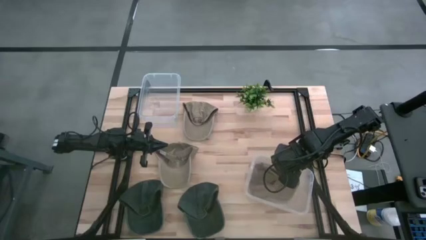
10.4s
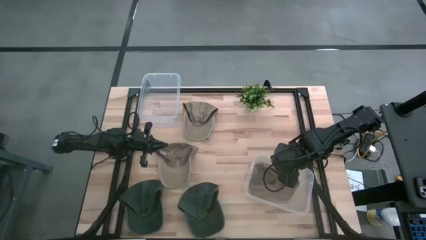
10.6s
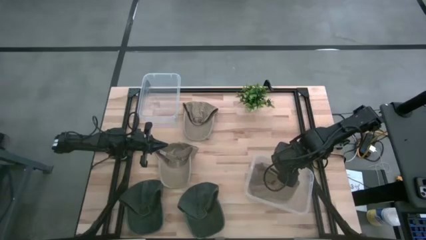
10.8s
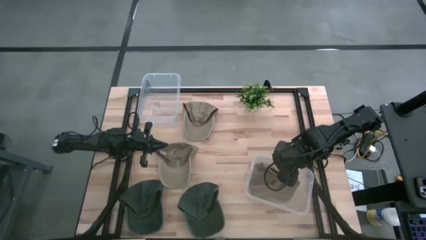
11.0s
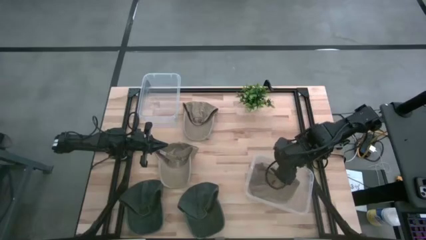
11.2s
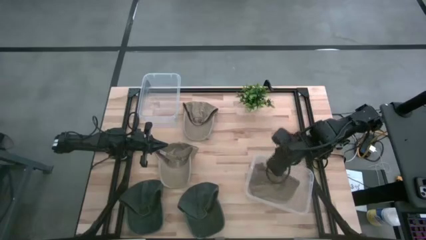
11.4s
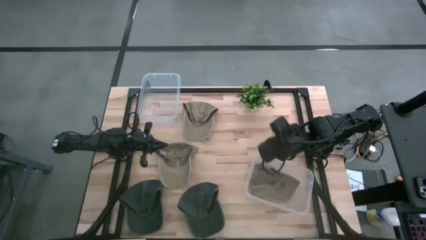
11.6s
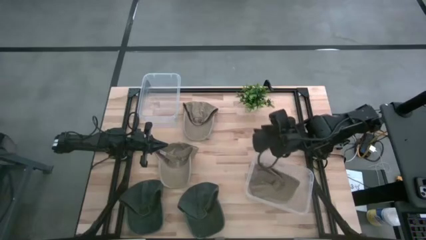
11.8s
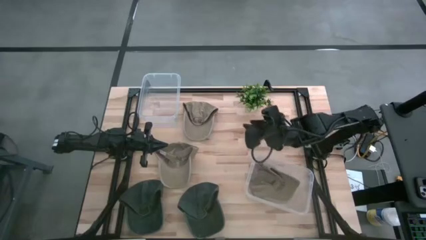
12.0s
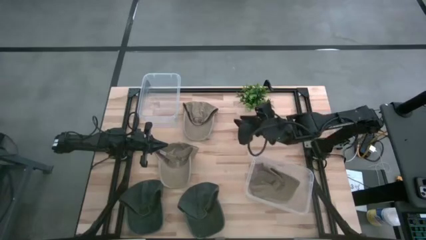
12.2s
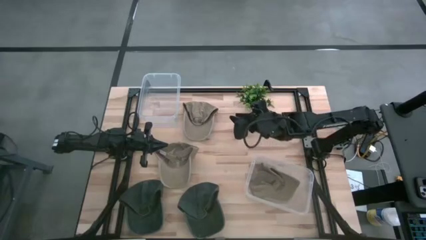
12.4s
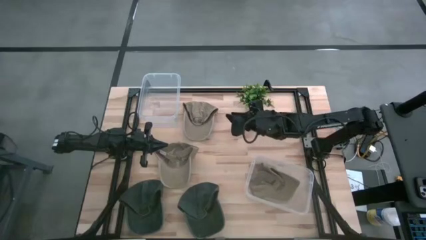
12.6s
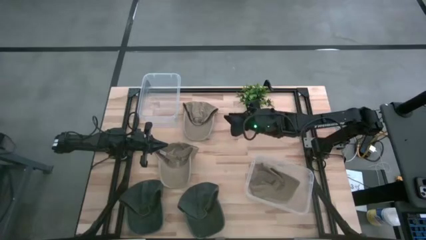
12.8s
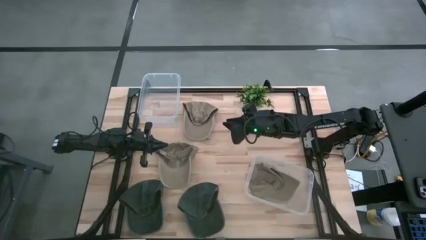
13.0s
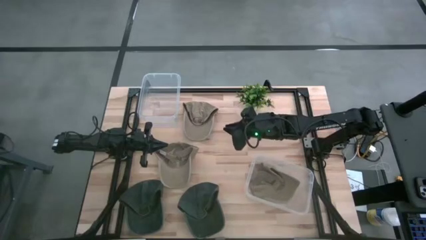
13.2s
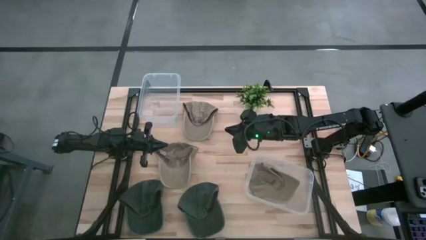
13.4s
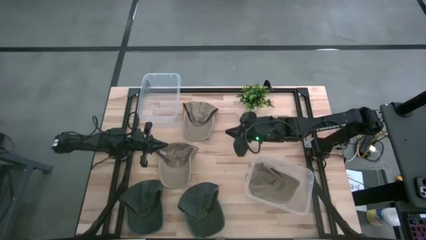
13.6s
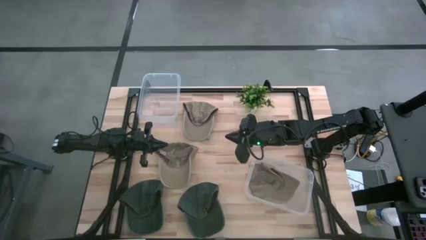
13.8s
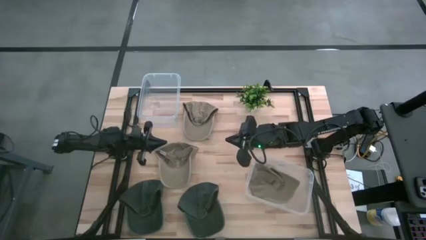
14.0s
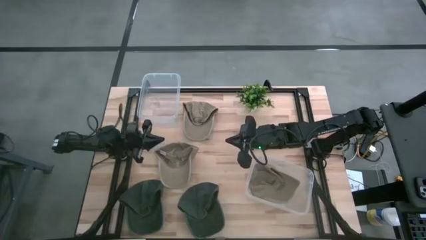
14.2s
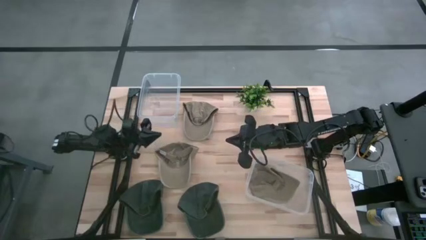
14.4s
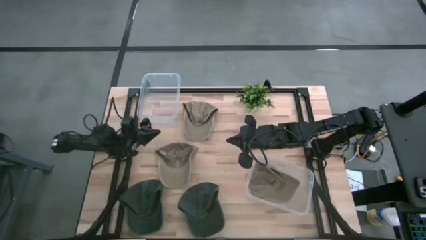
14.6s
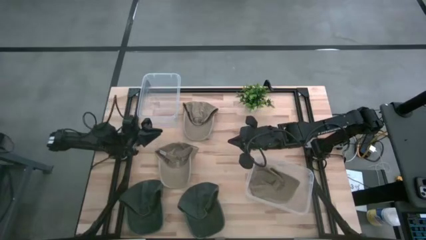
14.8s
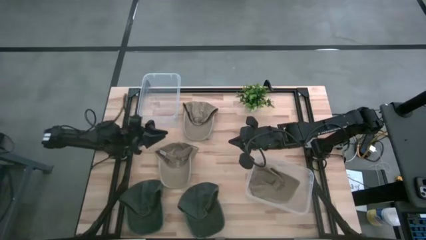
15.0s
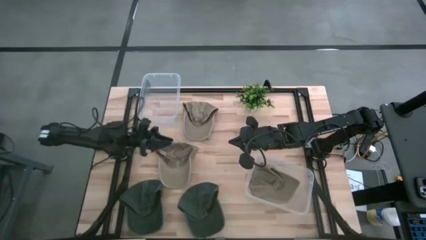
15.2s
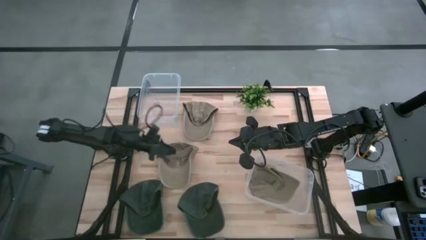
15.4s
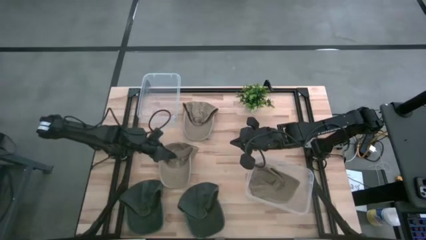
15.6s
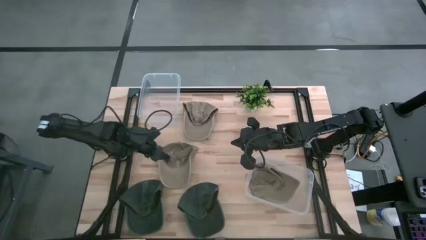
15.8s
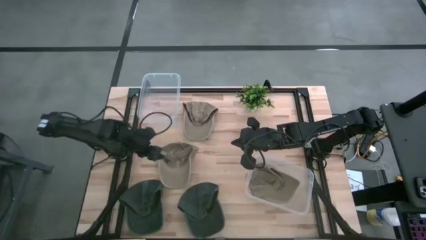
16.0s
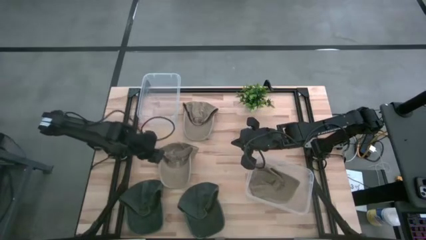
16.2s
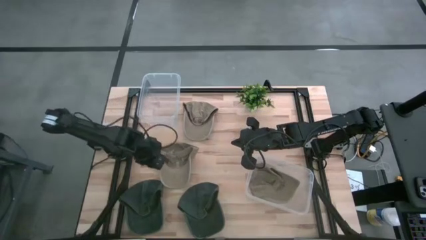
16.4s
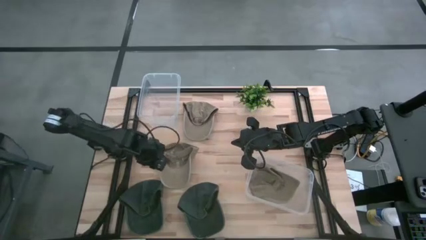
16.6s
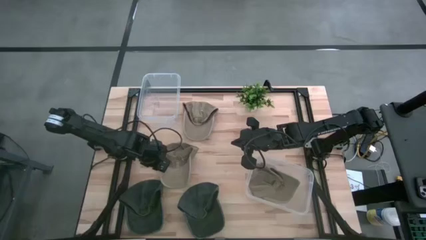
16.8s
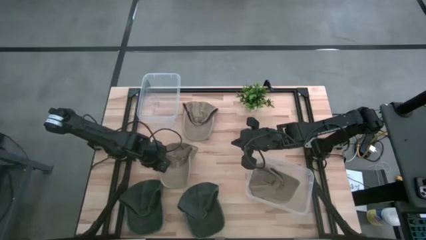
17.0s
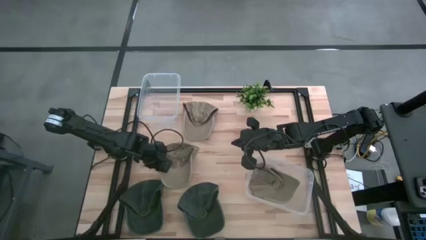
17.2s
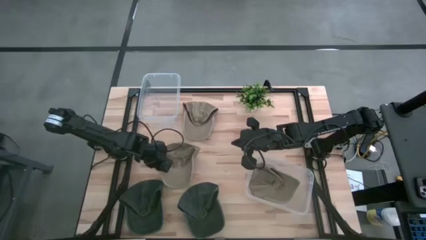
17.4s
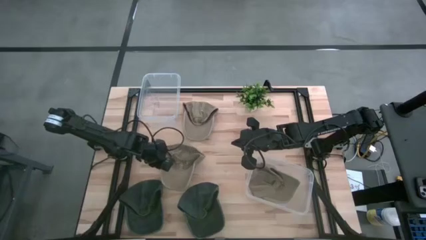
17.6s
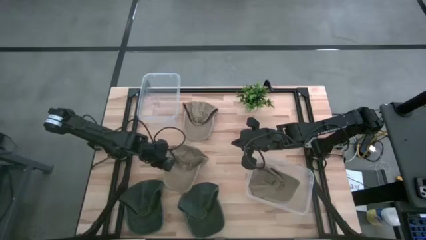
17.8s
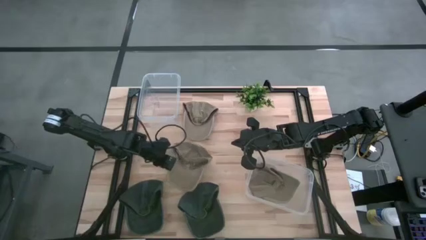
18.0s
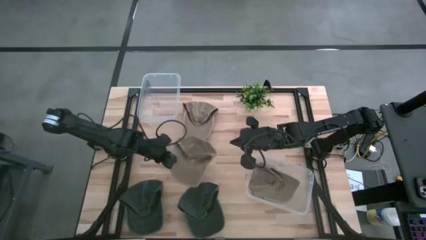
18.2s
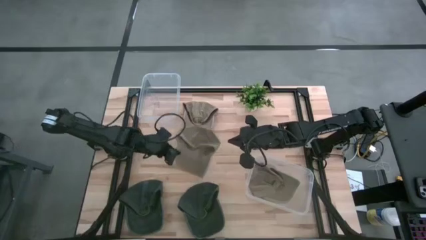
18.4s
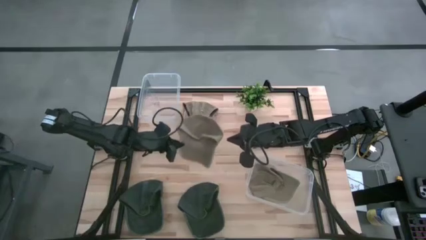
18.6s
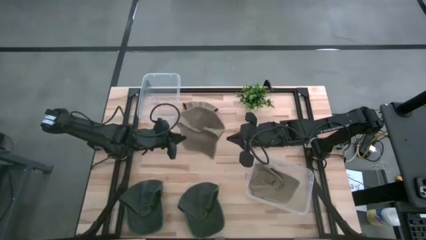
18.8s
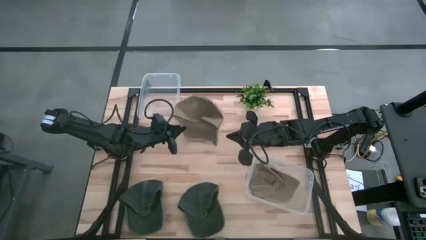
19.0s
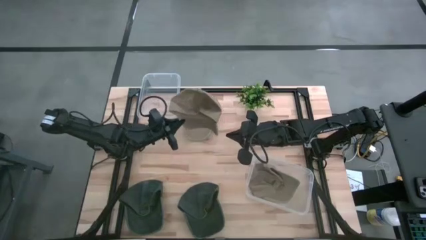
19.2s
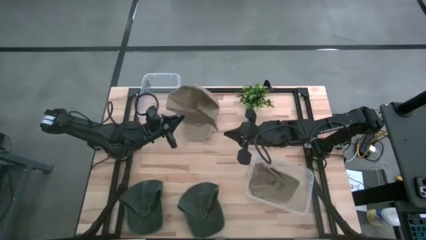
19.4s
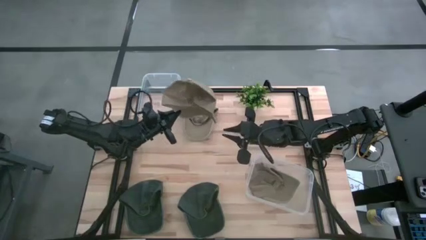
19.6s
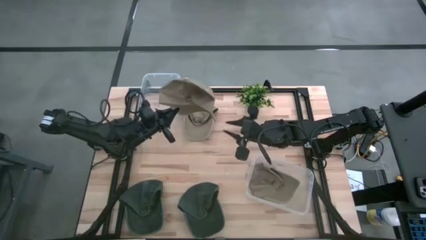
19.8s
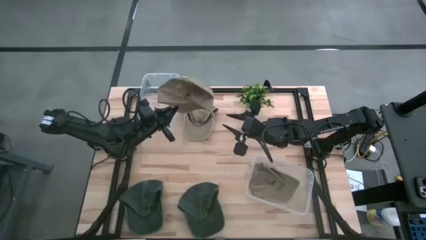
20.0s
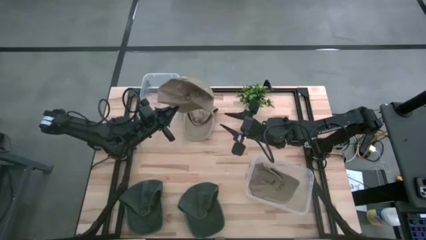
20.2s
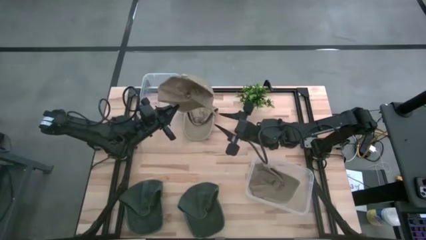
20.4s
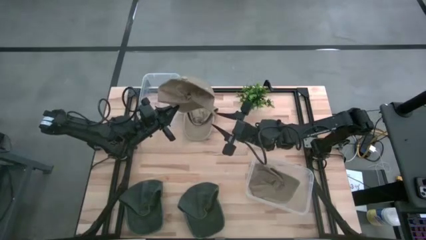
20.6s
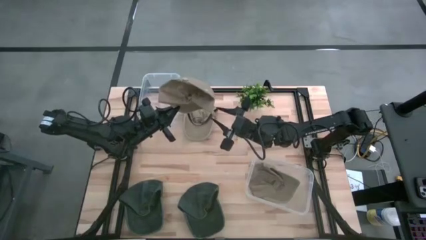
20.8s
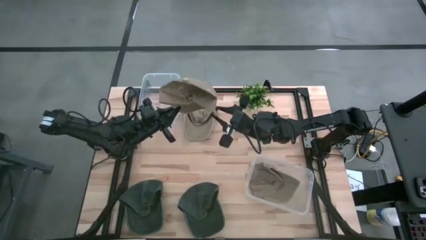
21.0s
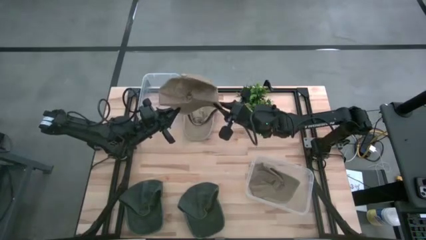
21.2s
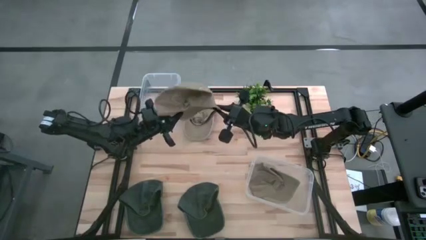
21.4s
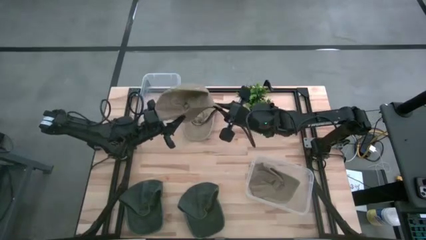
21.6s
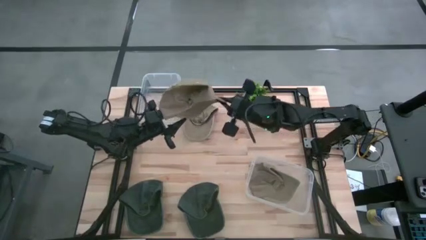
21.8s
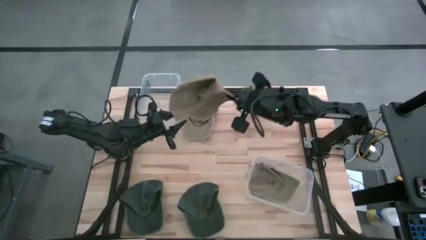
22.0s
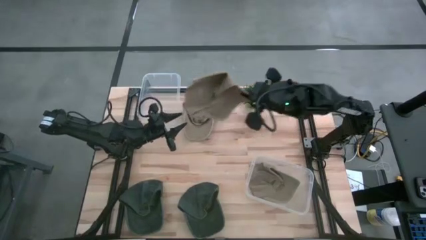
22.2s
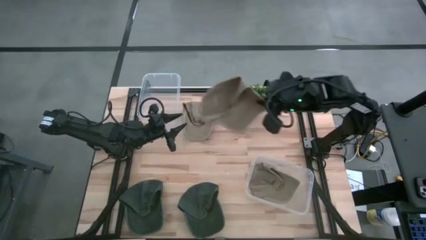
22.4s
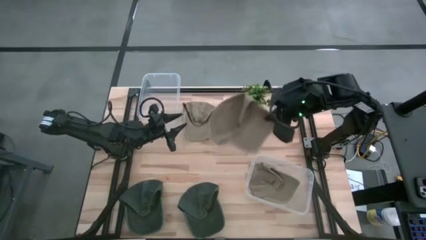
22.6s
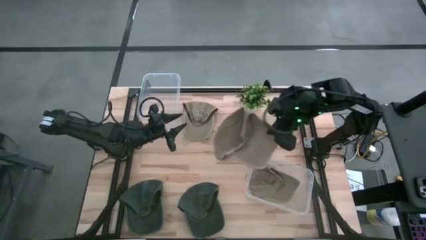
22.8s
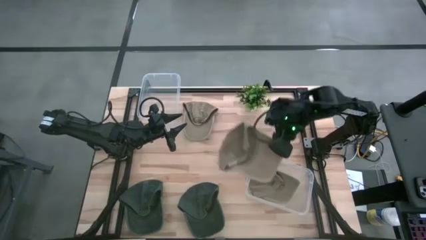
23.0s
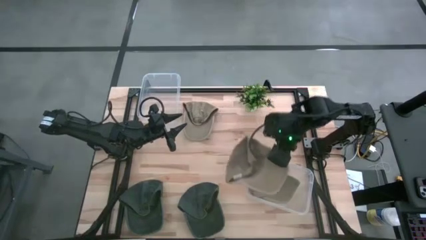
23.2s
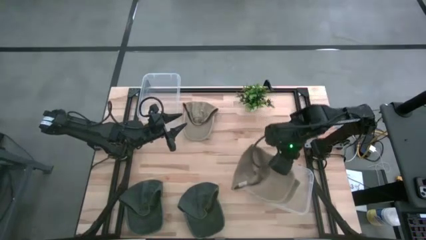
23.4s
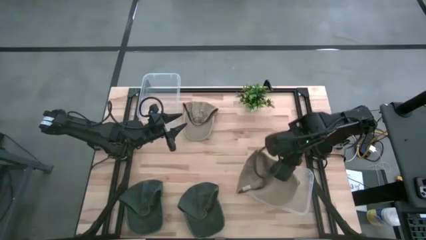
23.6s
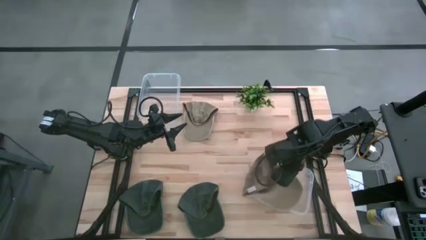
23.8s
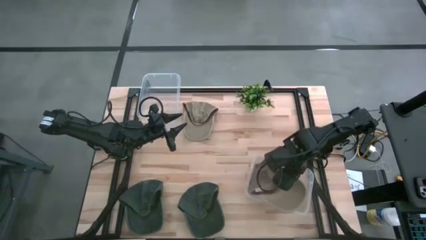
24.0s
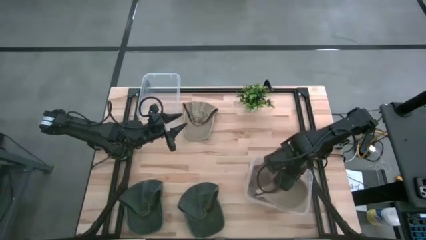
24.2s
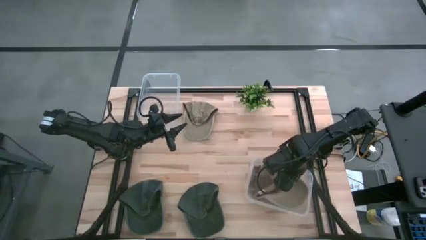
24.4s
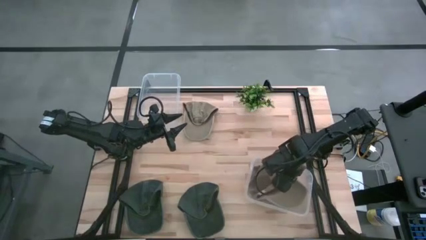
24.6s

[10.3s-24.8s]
Task: Pick & Place hat
Put the bottom brown cap into the bottom transparent bin
